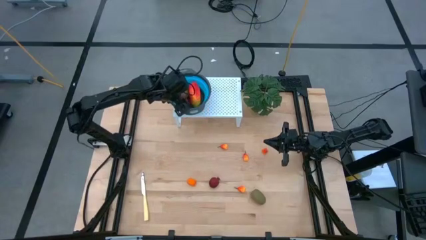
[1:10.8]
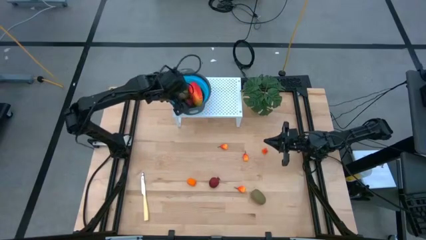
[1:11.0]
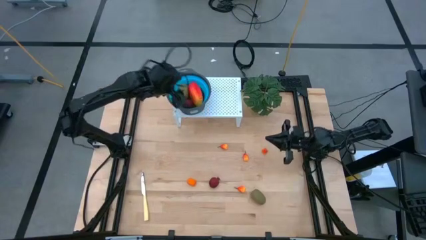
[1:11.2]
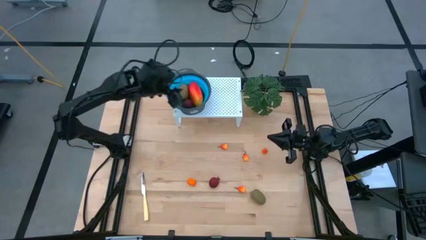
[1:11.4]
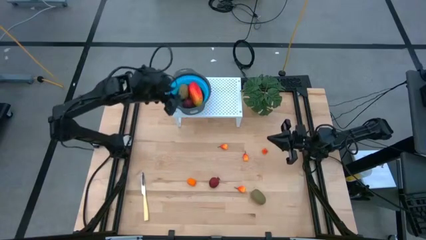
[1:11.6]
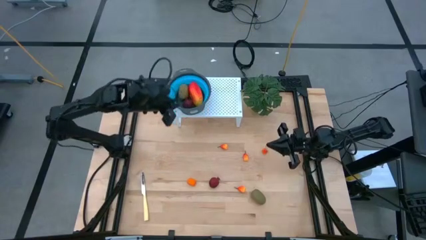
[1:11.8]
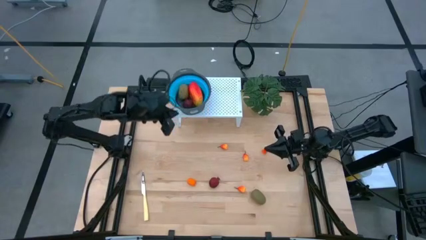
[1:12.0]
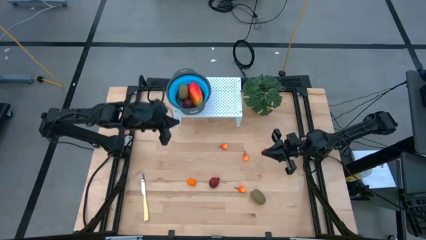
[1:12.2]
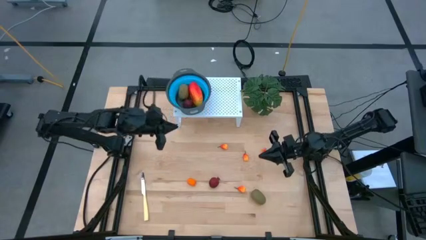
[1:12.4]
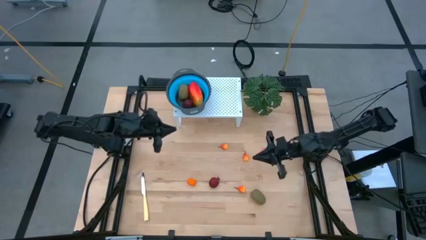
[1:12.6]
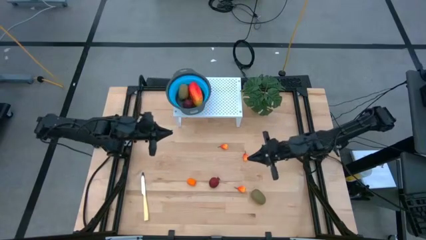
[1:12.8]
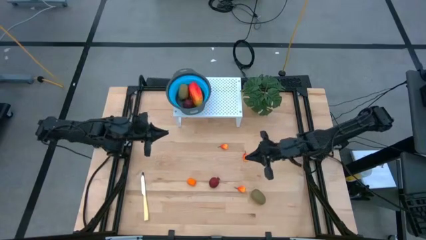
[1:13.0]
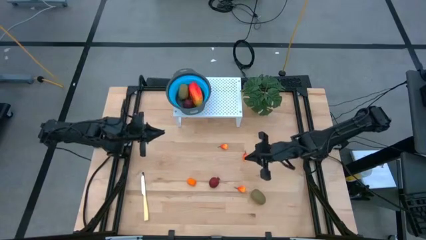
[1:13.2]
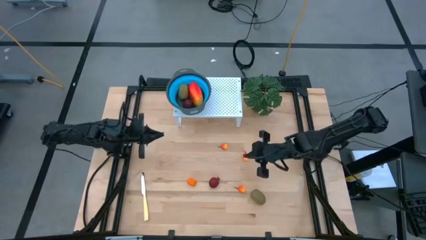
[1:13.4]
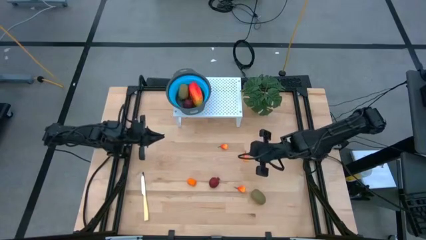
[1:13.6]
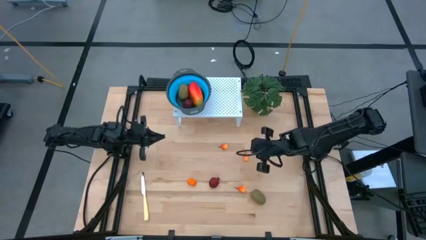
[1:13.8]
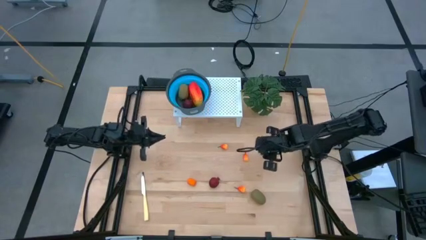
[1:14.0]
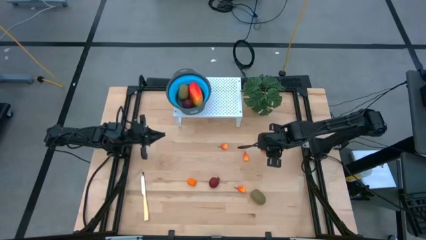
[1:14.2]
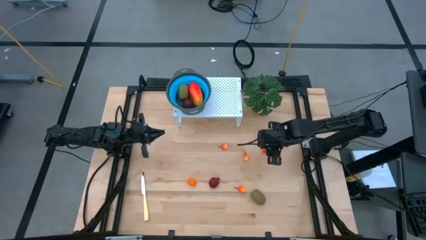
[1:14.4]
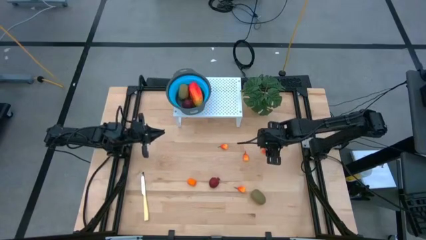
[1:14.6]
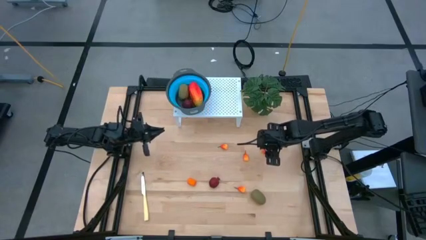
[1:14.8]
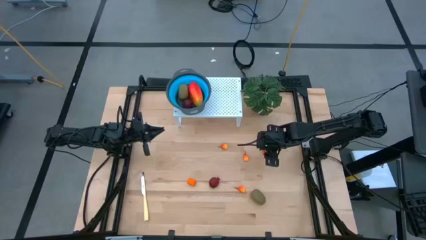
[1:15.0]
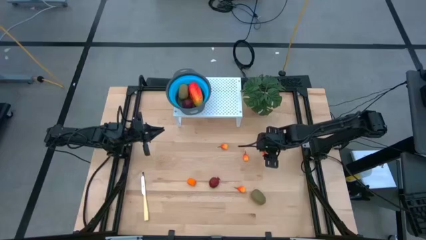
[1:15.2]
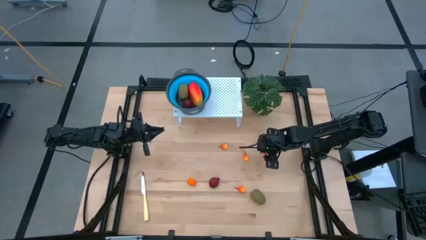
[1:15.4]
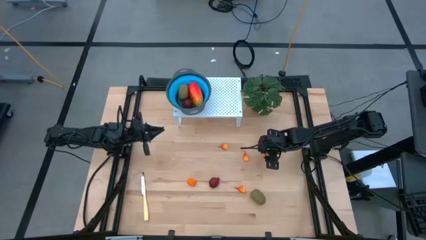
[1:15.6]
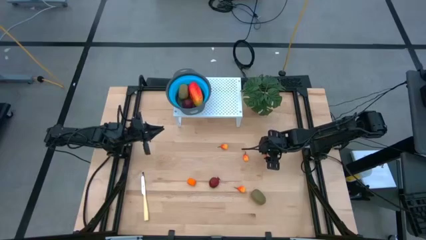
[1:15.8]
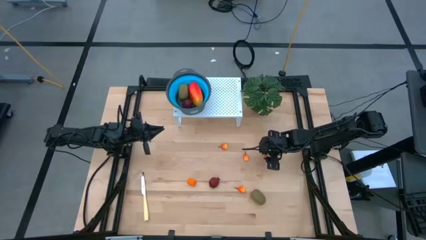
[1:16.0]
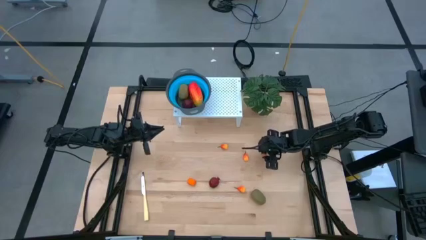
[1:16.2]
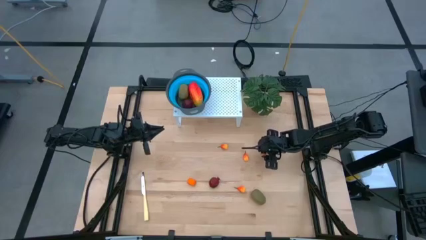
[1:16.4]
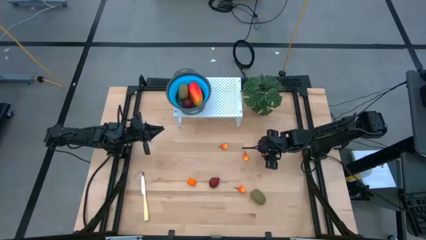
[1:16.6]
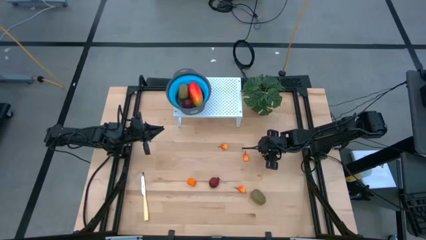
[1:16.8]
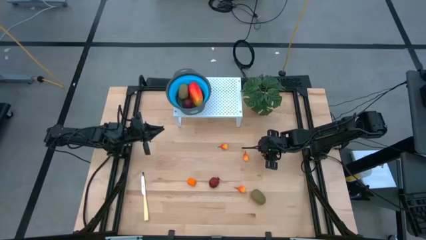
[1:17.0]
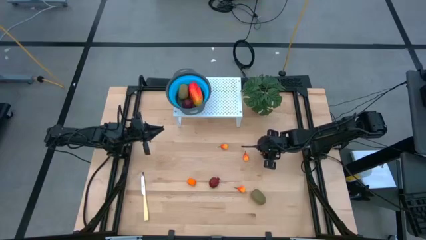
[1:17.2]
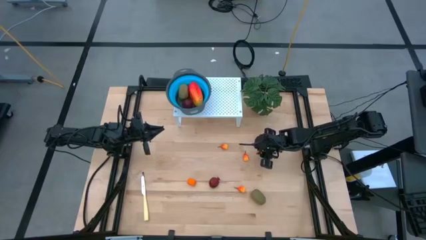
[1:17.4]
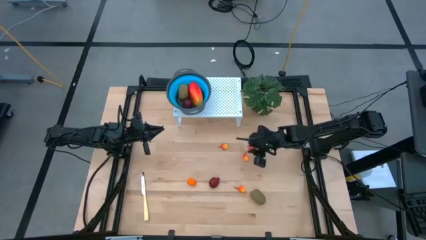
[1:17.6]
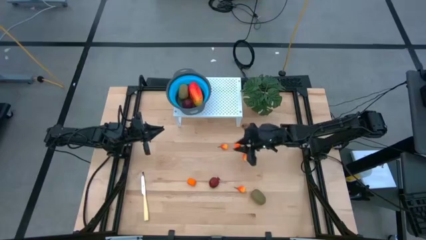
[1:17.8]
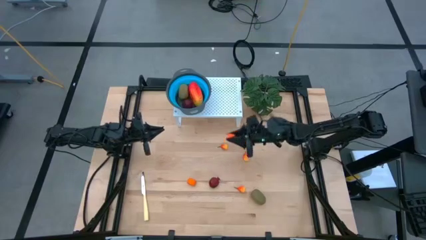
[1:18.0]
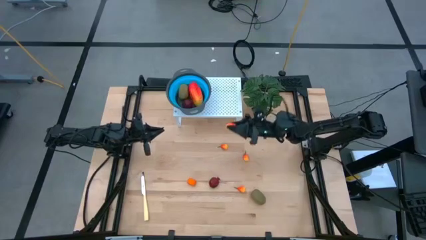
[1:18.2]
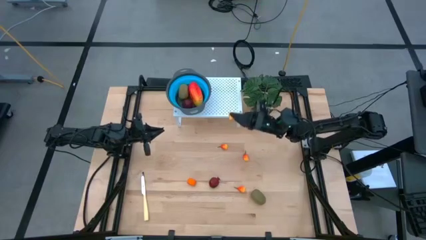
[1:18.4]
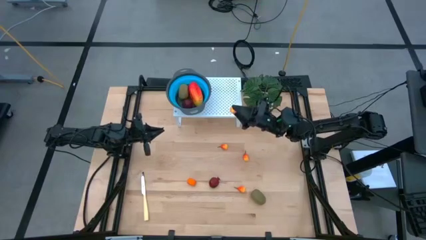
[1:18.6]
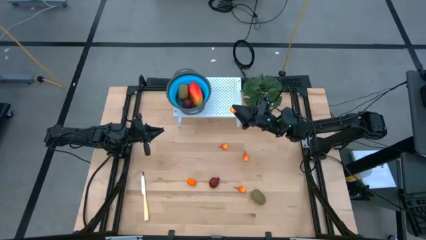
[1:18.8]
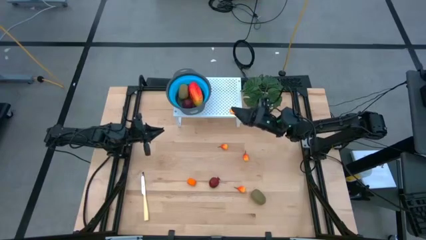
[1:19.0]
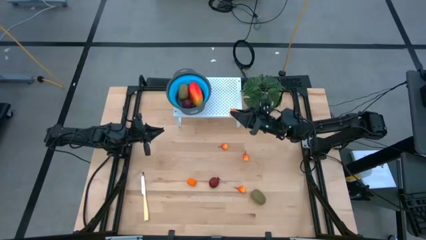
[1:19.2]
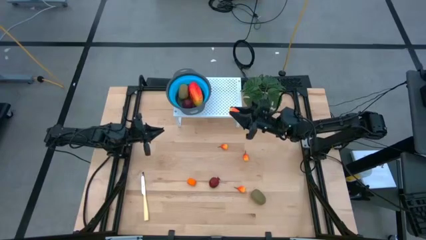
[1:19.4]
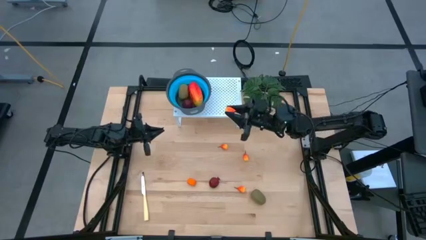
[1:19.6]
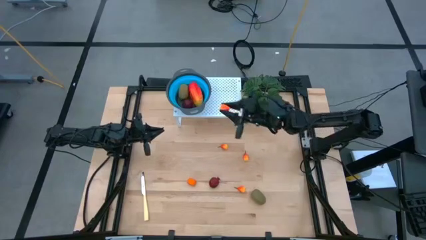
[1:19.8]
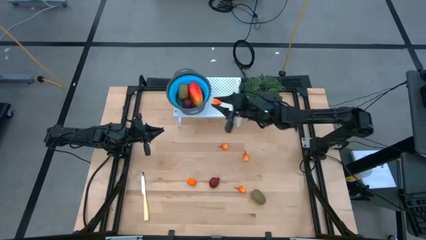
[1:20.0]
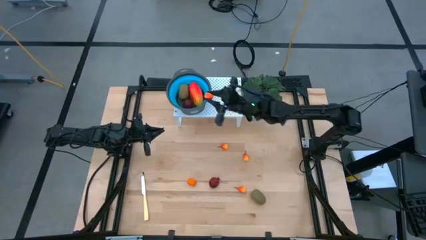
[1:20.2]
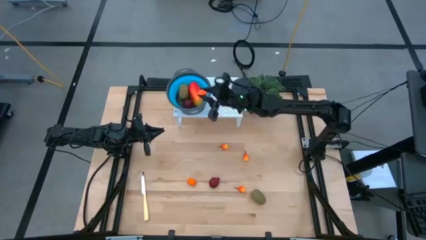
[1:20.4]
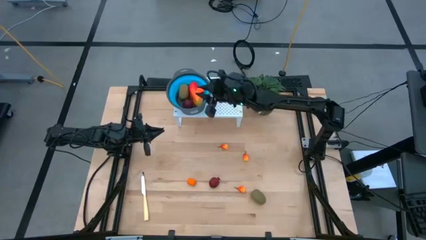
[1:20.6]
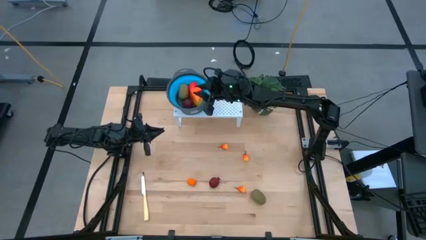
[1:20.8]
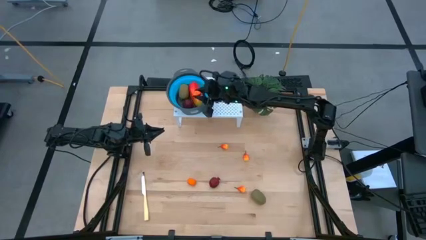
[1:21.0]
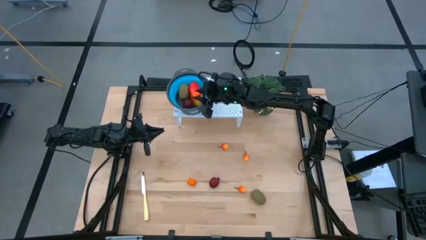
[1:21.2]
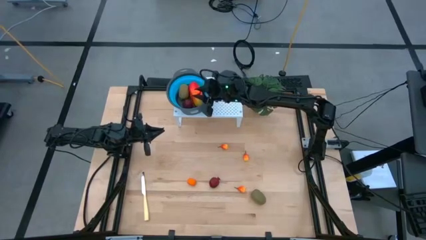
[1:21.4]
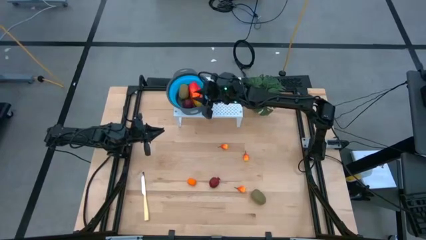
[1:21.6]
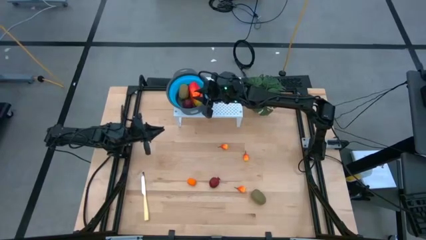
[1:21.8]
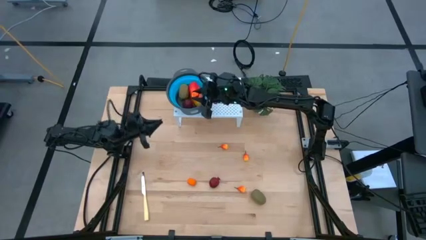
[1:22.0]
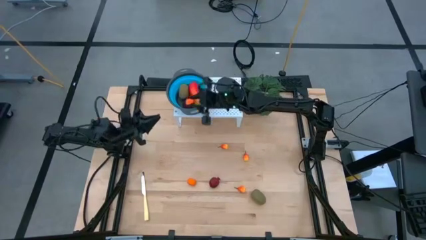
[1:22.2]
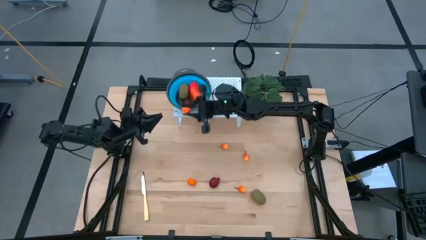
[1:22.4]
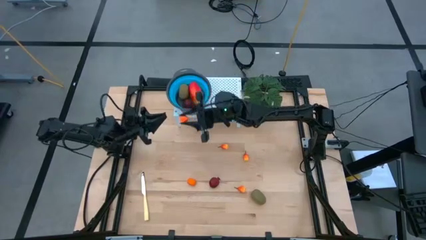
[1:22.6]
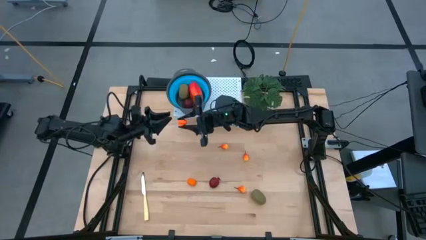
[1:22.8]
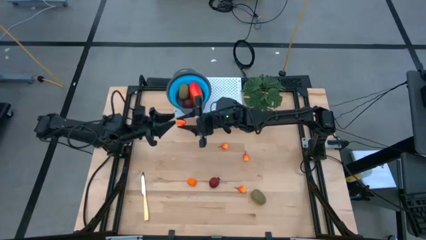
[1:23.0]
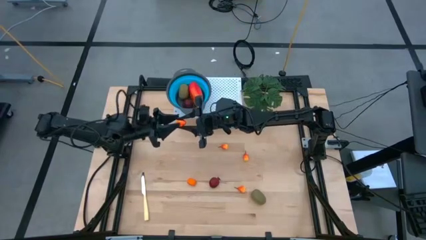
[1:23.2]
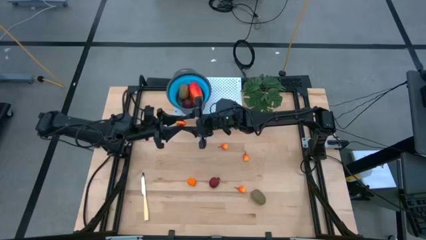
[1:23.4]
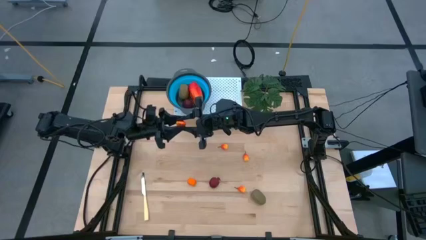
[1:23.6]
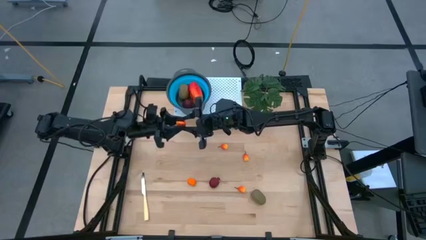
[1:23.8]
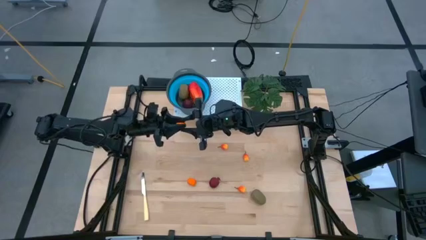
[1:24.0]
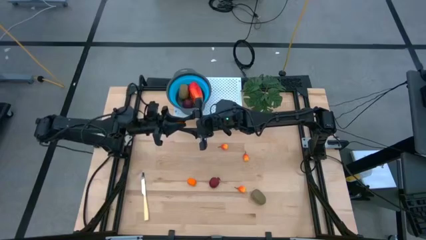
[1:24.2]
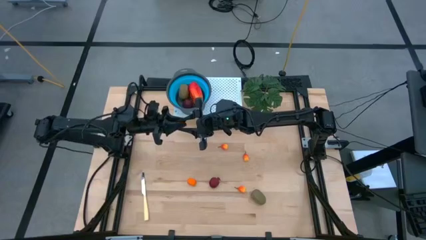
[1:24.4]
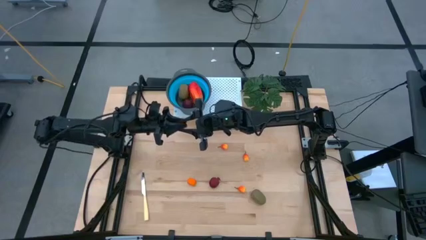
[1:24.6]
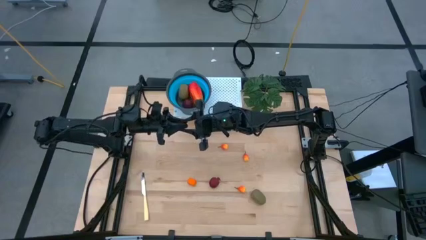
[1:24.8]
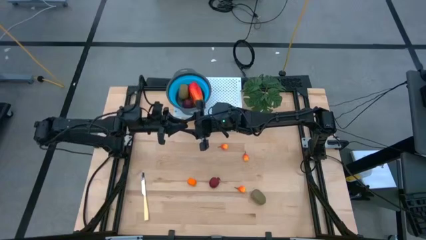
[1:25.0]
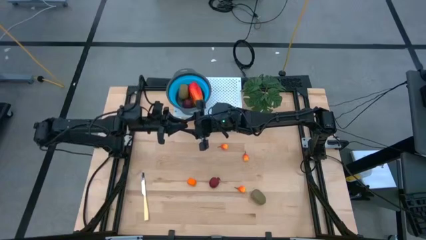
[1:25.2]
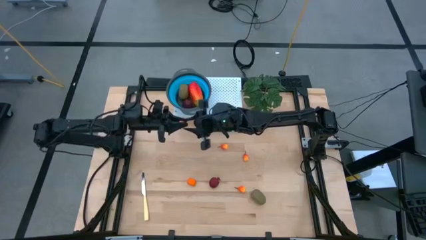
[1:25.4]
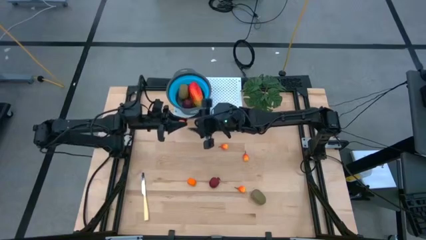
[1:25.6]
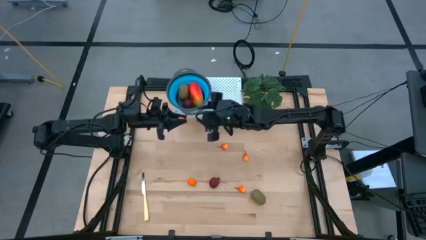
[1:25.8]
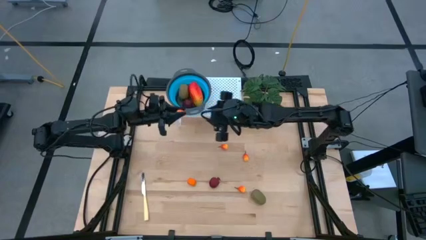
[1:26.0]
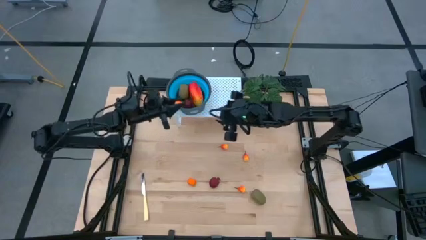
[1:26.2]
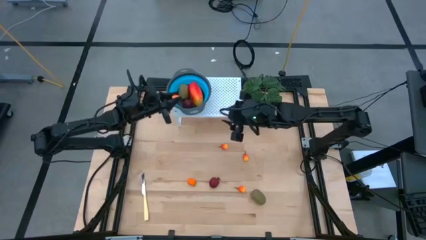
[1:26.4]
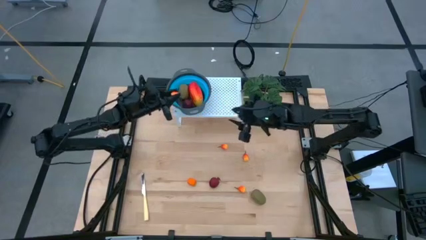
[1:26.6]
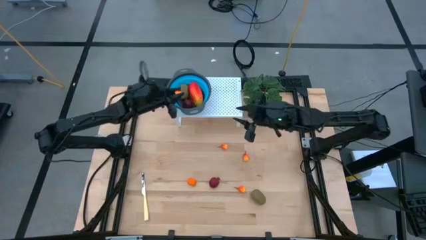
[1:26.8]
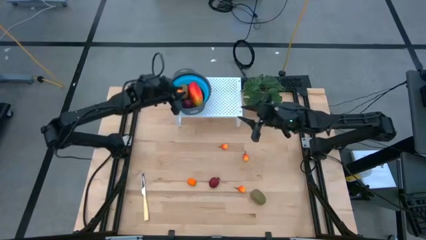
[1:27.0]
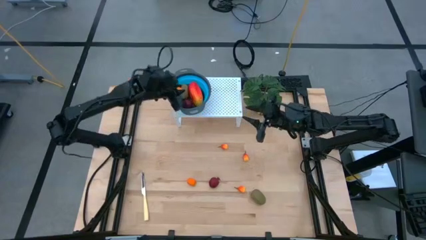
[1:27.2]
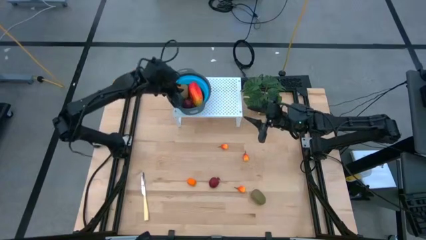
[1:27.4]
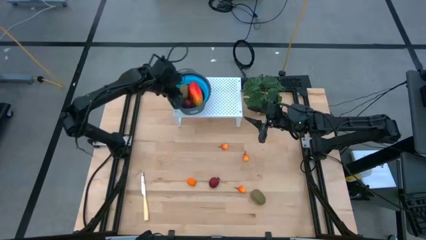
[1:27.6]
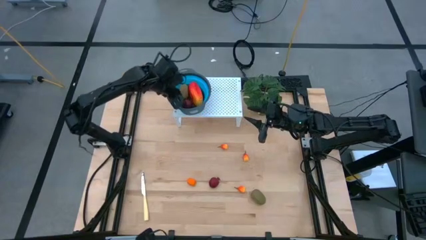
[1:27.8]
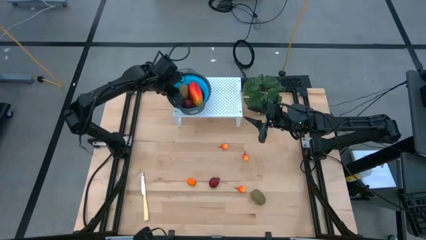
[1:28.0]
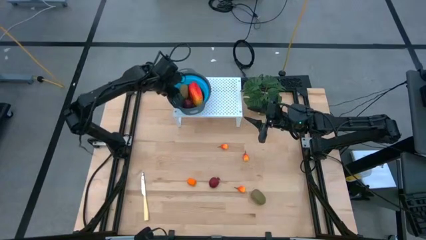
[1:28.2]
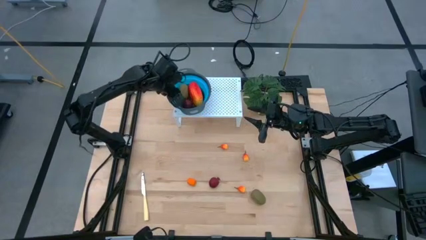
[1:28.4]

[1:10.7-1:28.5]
Task: Pick & Place Fruit
Put the peach in the blue strainer bowl on the shelf
